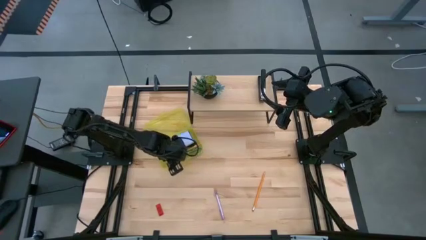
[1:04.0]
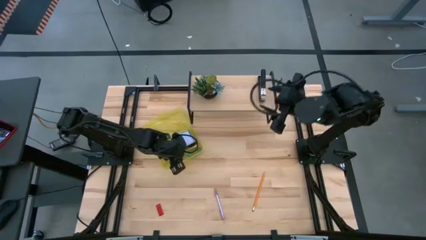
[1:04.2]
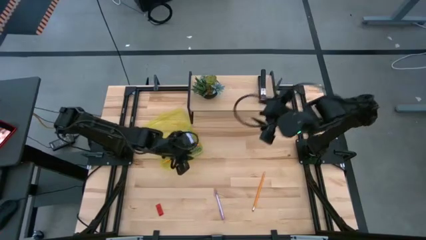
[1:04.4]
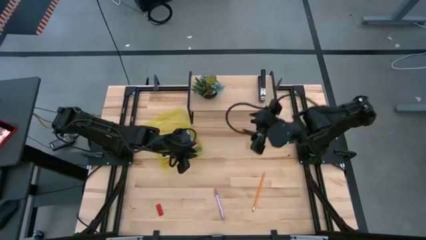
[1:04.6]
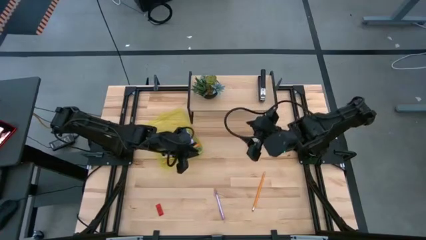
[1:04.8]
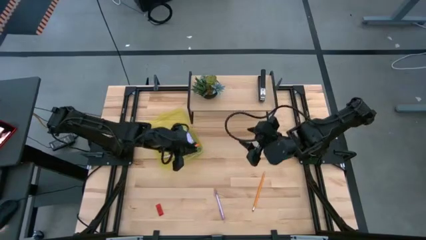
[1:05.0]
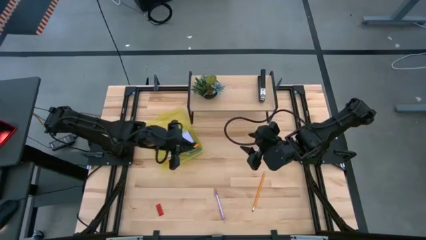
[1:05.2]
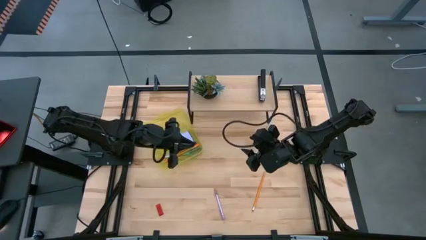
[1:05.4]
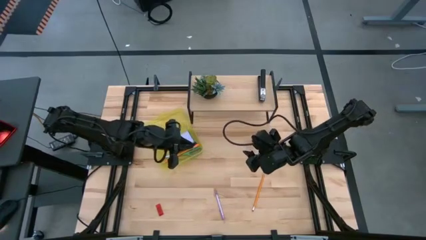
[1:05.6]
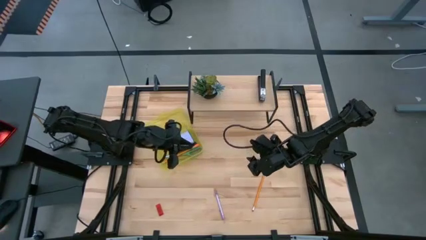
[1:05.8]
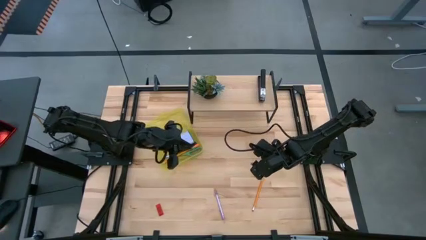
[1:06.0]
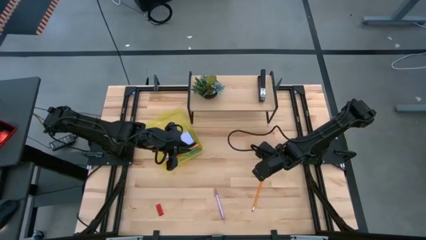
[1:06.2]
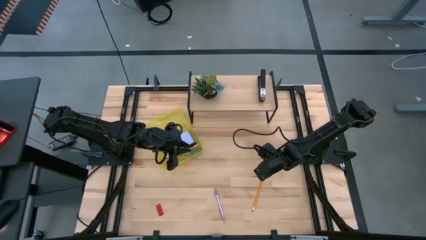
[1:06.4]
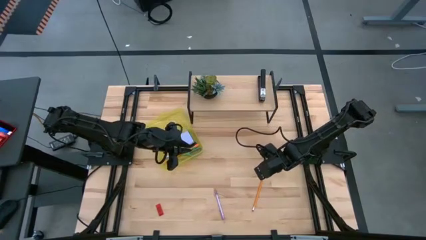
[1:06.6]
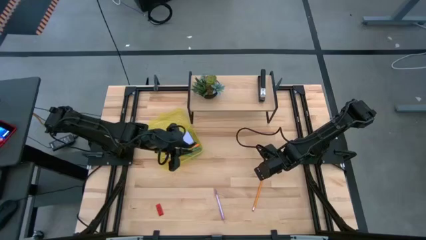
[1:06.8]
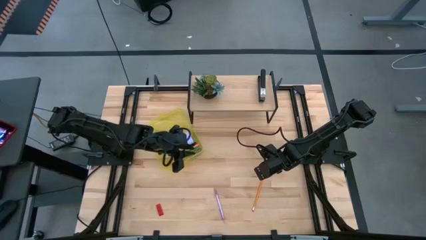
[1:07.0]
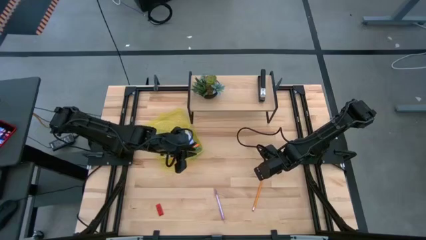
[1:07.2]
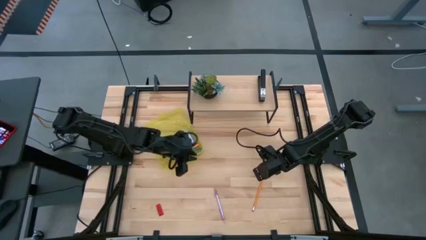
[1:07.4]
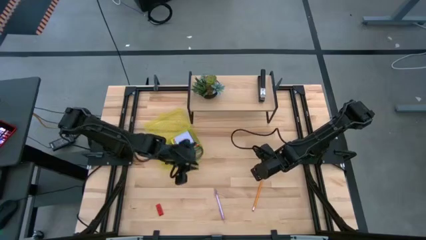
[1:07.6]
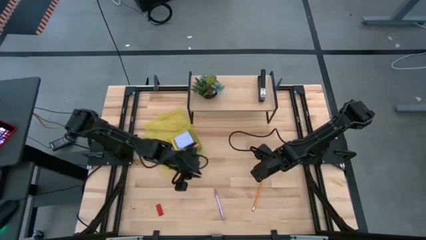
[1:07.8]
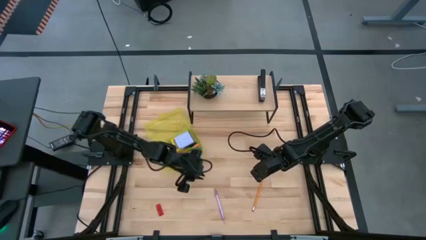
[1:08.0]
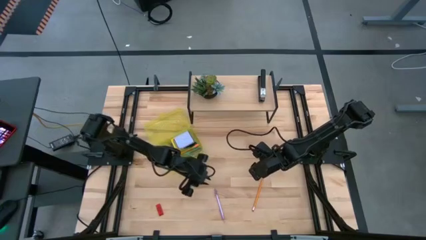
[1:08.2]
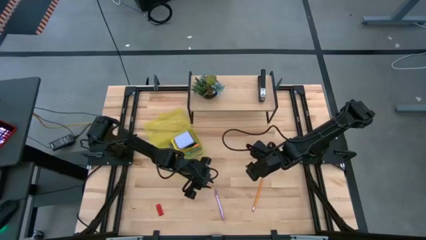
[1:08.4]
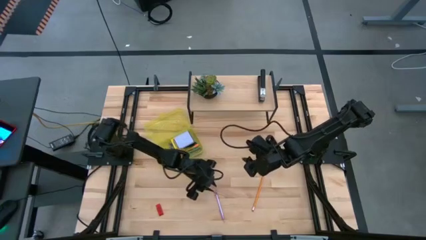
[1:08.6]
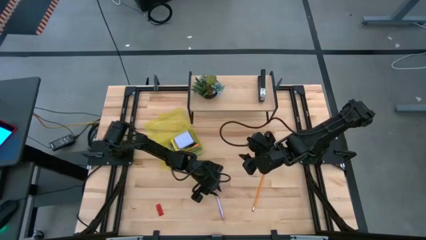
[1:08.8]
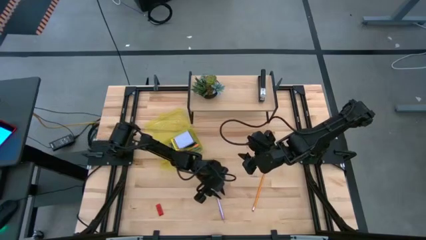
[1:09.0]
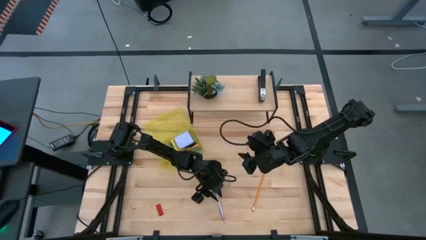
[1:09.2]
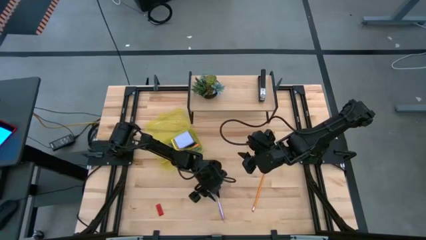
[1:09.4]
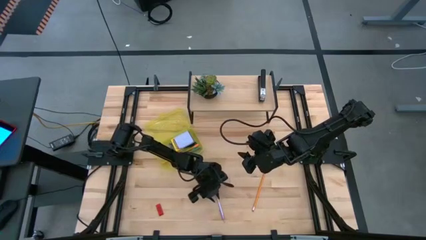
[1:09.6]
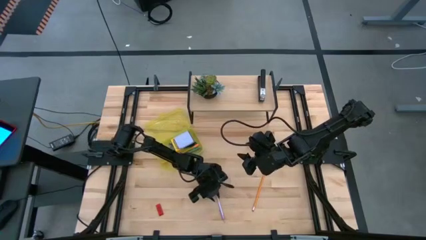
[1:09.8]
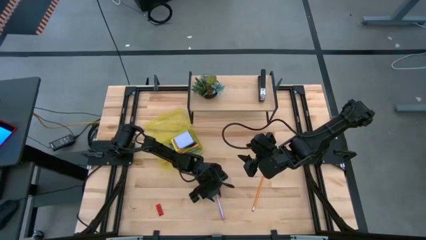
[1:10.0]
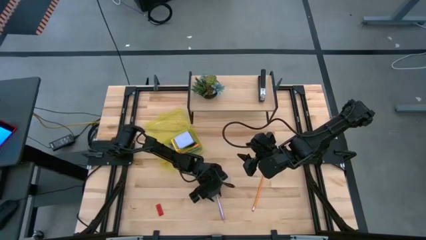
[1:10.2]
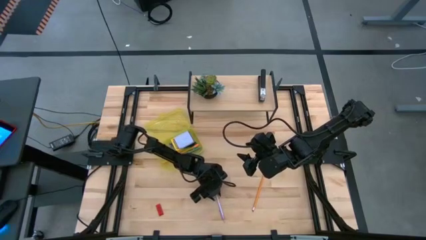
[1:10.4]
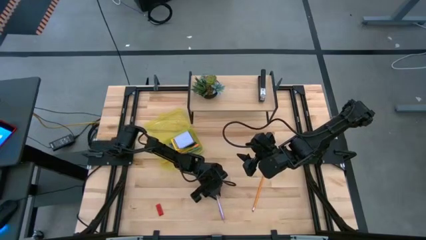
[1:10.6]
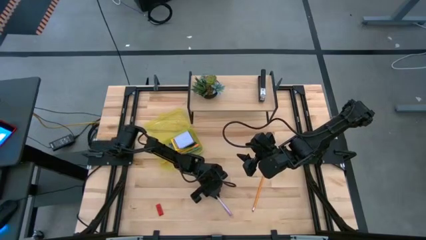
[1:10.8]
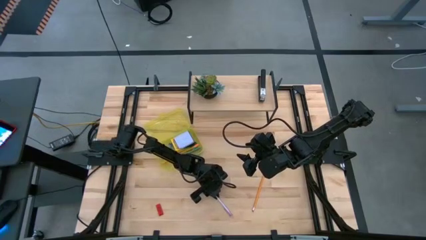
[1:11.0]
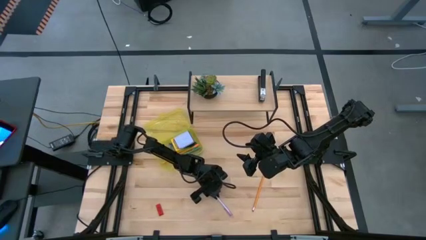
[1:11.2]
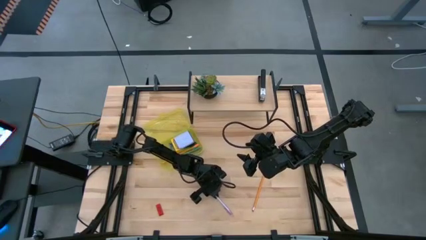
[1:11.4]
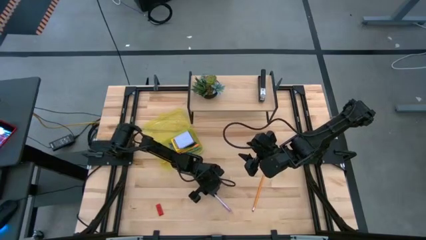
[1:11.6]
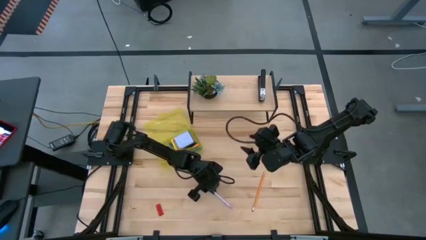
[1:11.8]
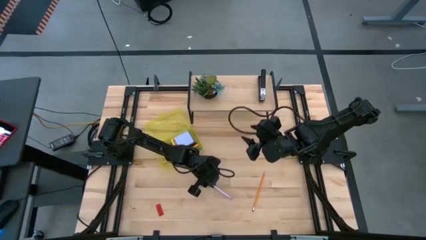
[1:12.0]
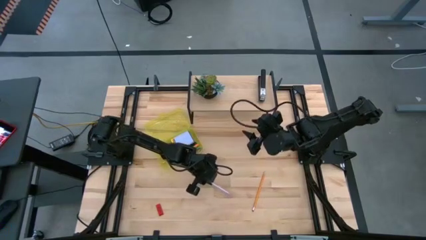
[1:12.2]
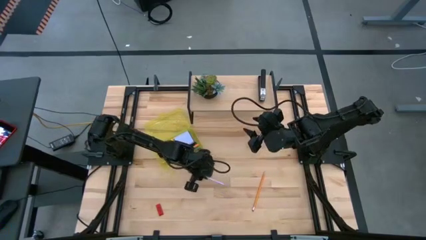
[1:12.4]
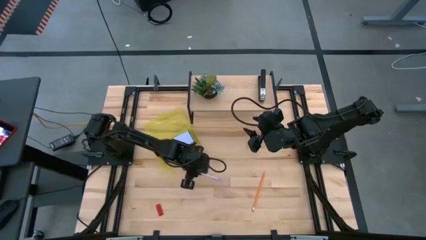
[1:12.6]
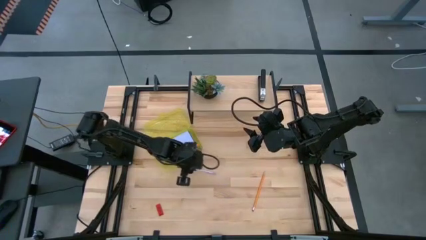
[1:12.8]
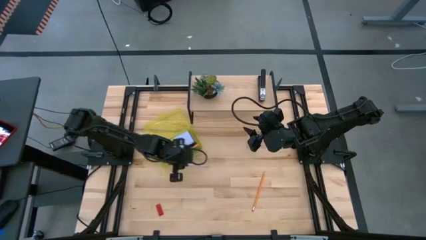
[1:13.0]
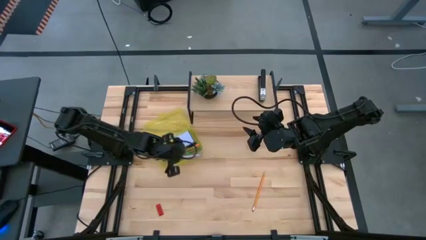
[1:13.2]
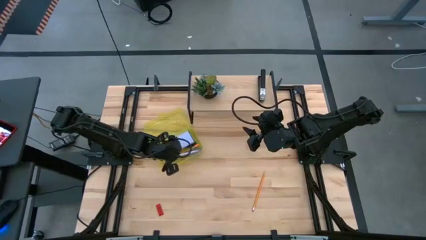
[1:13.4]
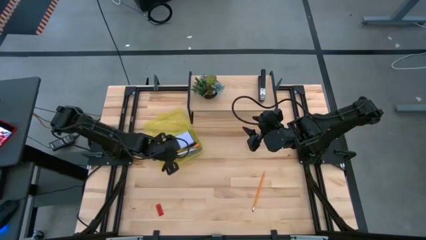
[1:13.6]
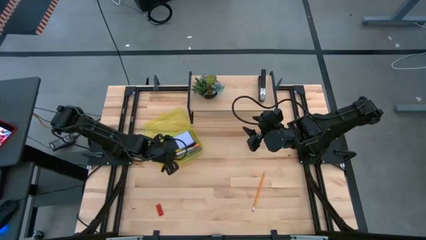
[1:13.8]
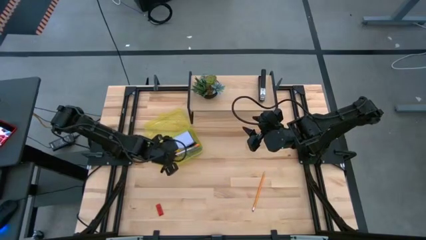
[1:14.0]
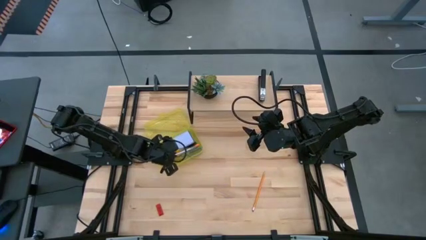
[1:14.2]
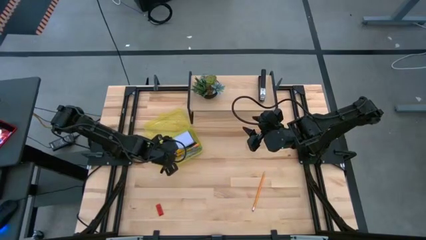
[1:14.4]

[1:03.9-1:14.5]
Task: Pack school essentials
Put the purple pen into the yellow supply box

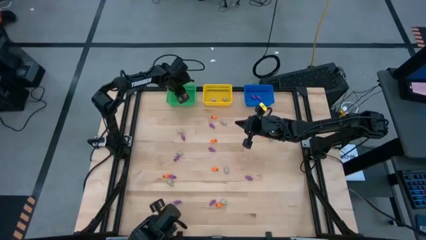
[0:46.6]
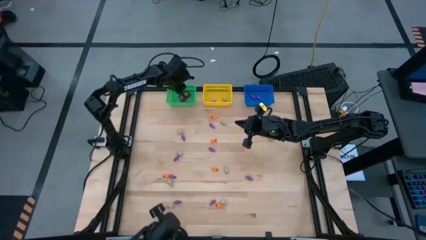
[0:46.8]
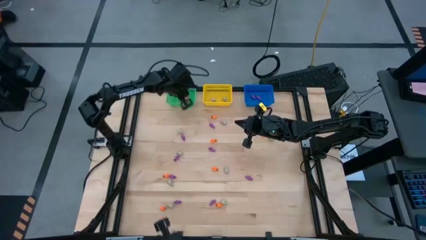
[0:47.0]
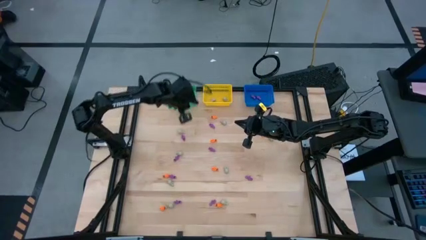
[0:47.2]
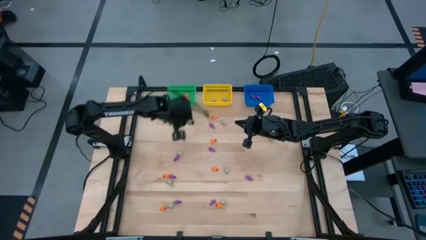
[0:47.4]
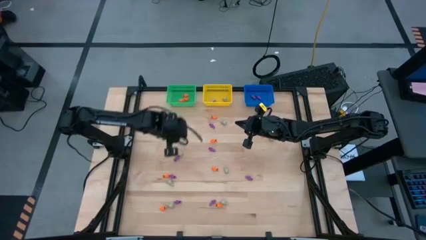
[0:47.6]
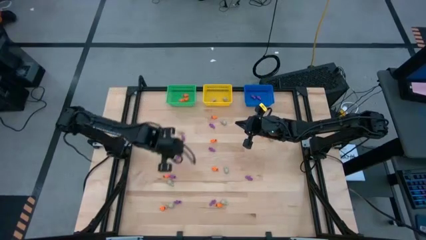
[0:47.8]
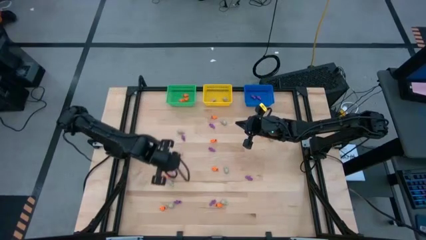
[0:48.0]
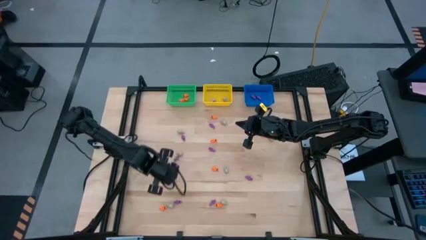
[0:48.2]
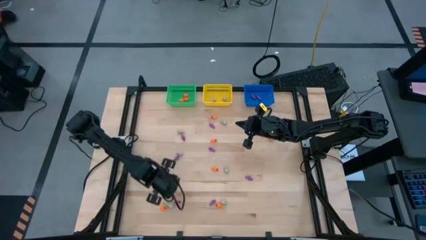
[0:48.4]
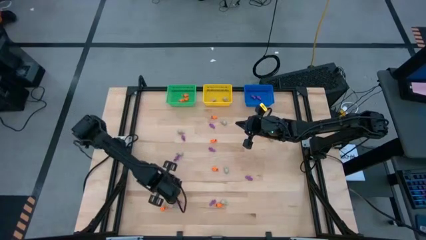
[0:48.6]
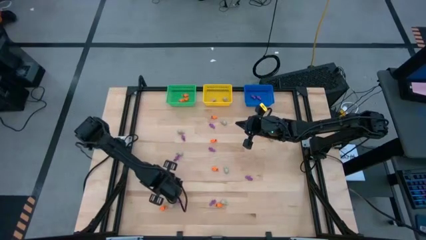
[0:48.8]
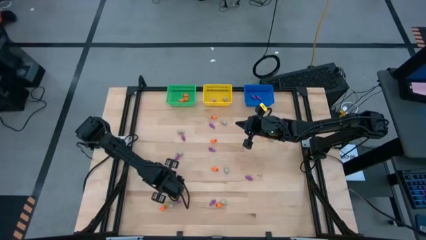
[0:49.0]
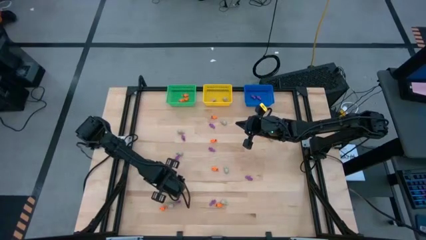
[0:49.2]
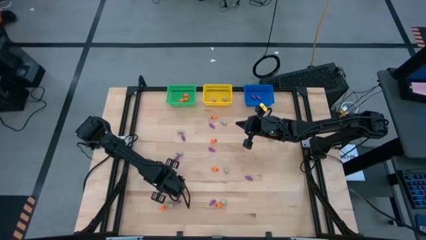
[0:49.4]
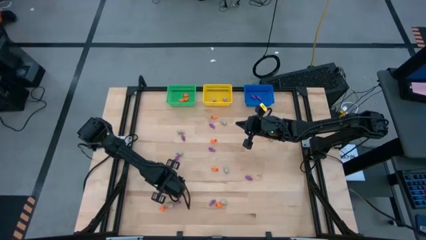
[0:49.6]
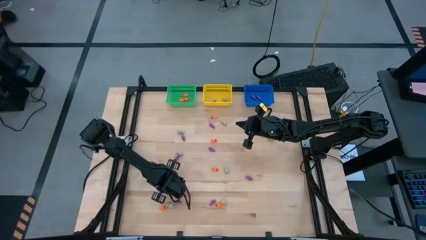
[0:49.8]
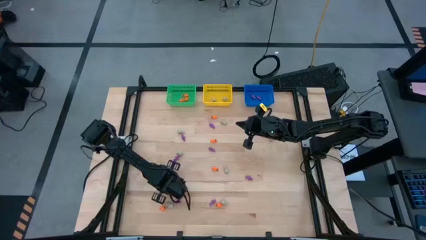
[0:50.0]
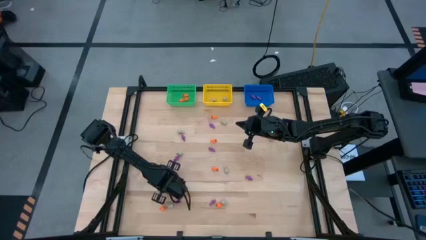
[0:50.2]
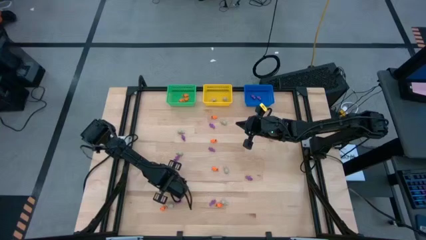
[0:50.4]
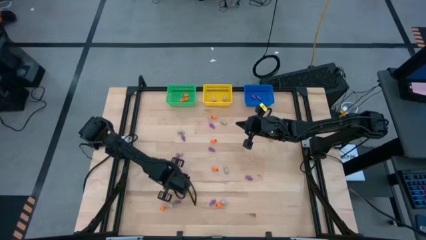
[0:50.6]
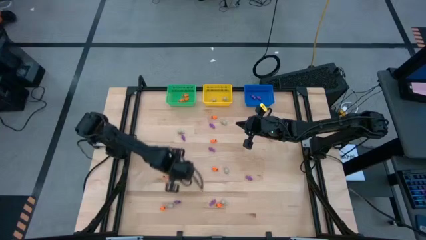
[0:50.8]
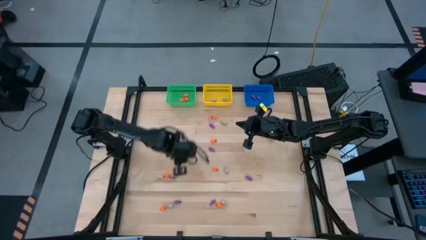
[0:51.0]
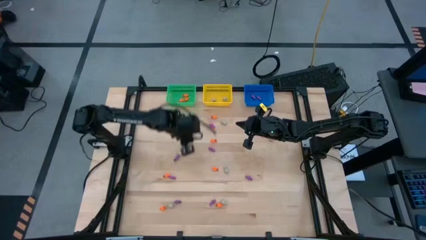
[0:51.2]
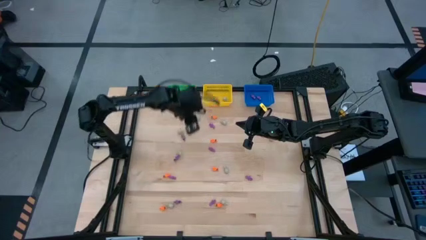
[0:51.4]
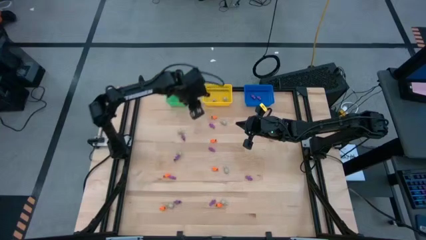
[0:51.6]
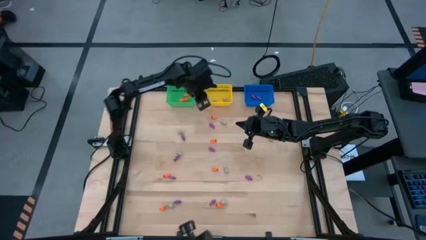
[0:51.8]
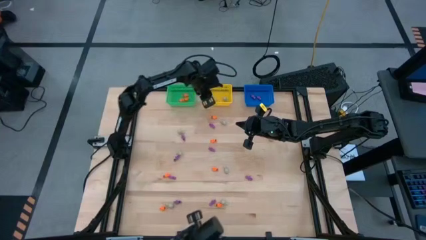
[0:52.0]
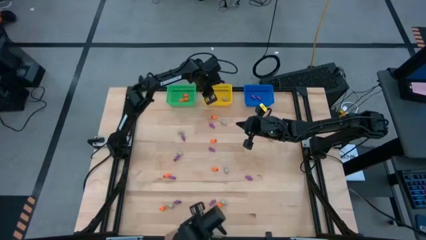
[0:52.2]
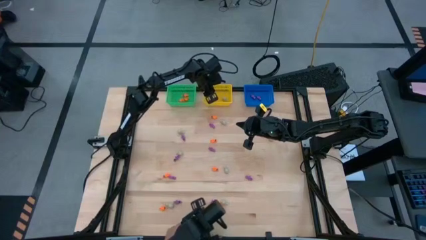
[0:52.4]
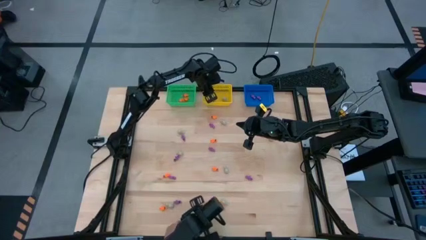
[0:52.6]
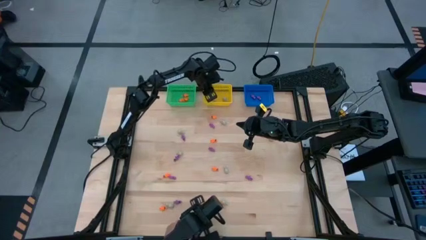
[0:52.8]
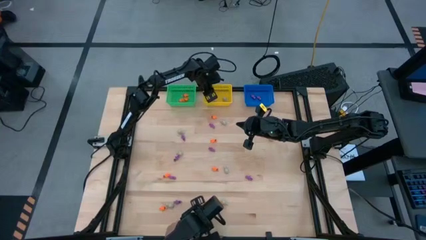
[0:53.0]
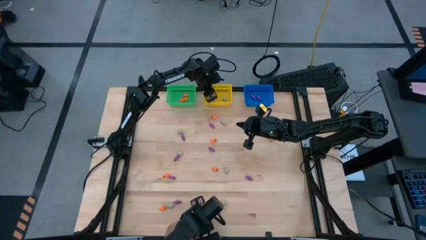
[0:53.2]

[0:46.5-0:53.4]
Task: Sort Halloween decoration
Put the white skull toy into the yellow bin
